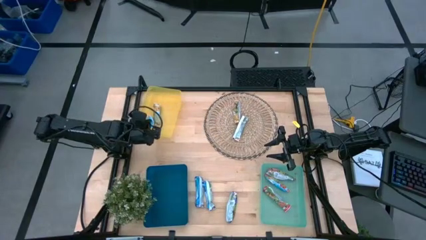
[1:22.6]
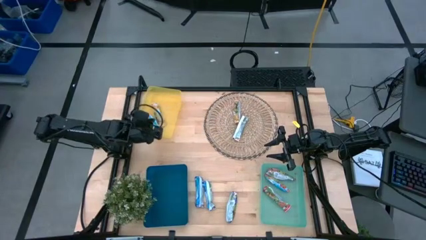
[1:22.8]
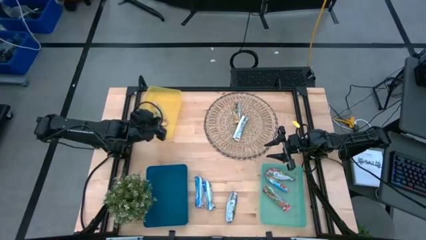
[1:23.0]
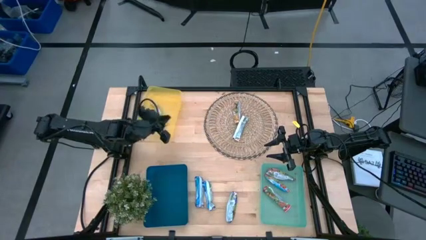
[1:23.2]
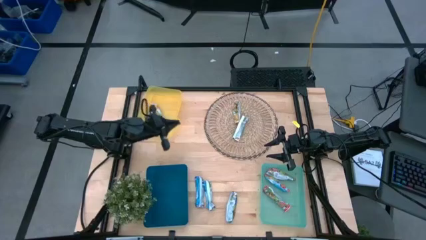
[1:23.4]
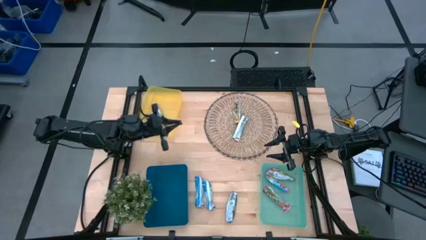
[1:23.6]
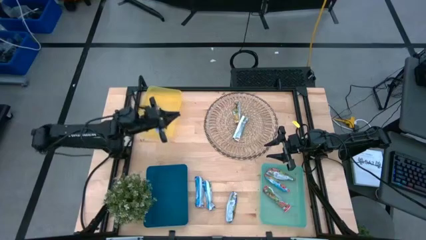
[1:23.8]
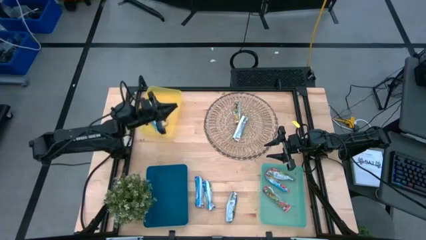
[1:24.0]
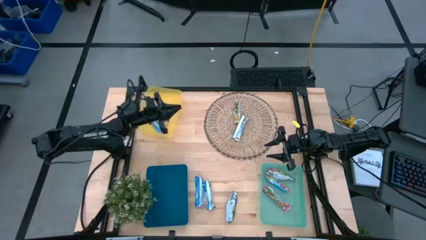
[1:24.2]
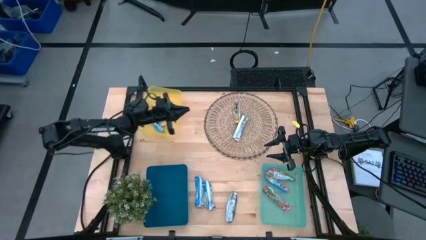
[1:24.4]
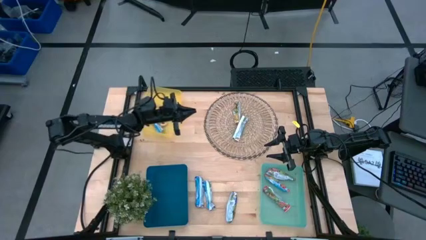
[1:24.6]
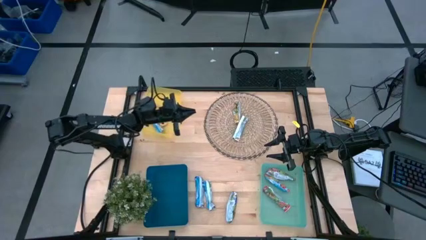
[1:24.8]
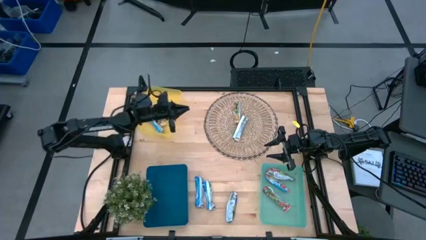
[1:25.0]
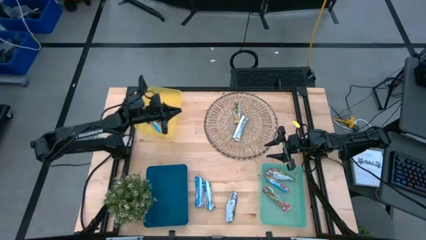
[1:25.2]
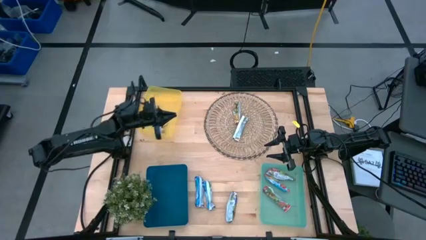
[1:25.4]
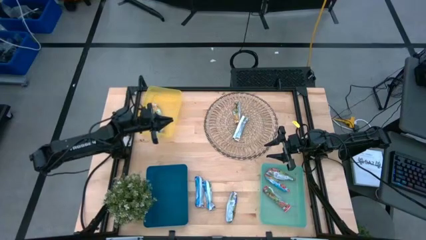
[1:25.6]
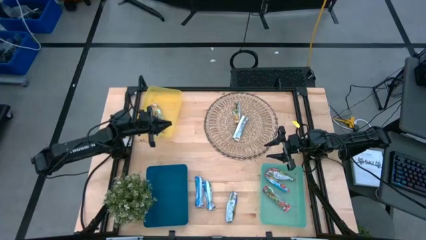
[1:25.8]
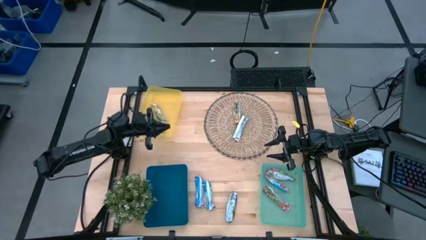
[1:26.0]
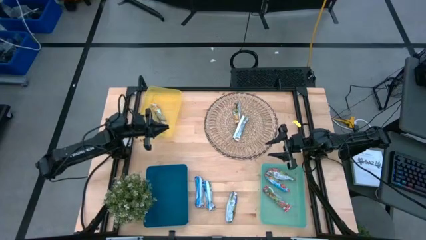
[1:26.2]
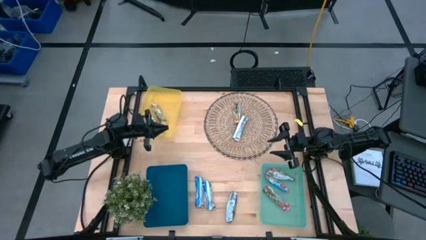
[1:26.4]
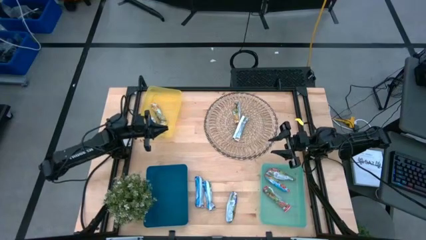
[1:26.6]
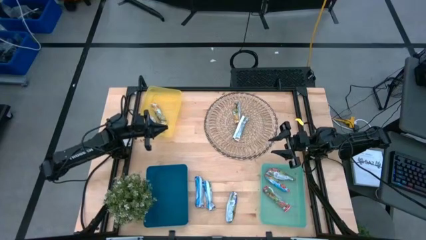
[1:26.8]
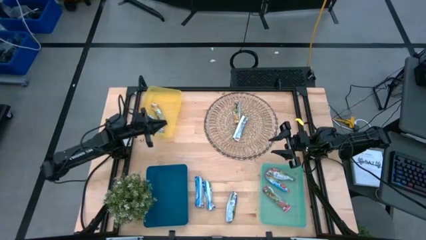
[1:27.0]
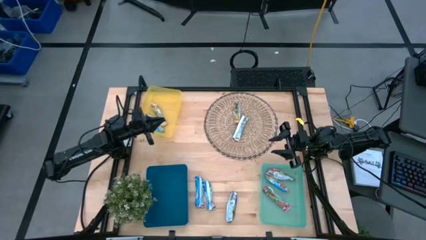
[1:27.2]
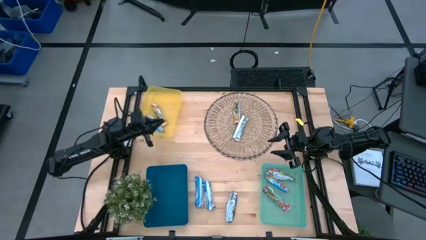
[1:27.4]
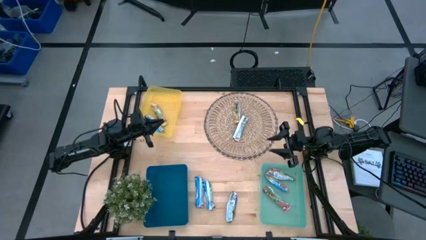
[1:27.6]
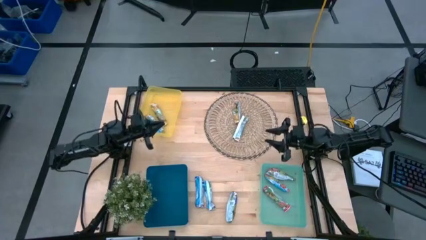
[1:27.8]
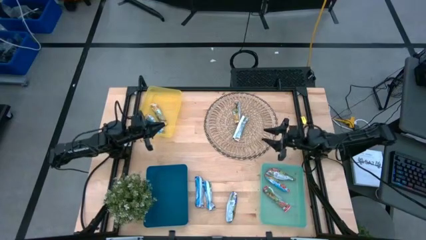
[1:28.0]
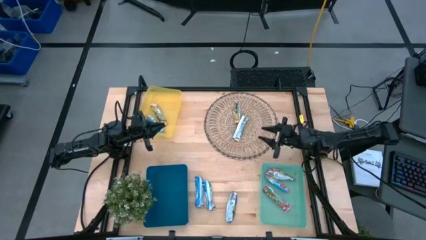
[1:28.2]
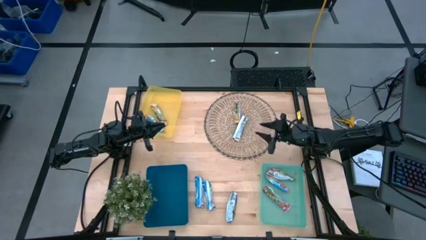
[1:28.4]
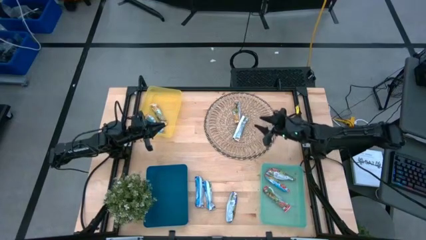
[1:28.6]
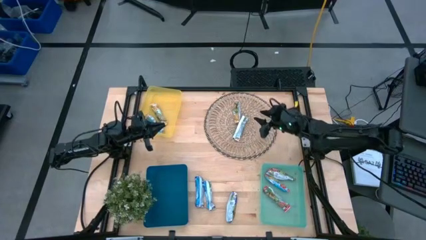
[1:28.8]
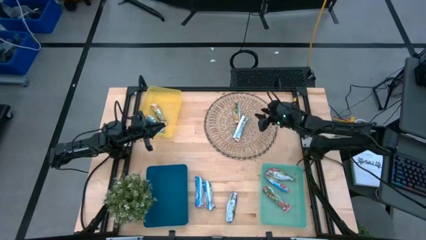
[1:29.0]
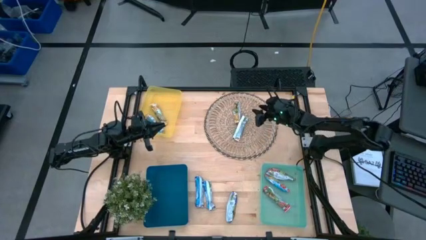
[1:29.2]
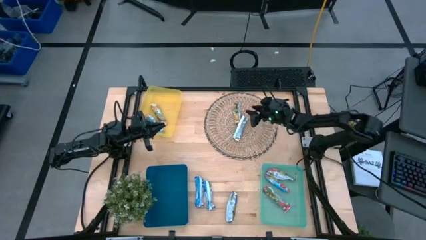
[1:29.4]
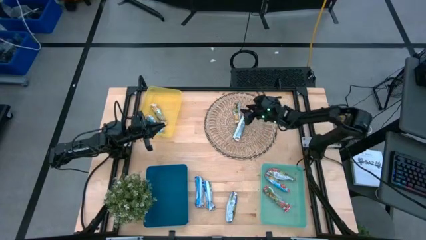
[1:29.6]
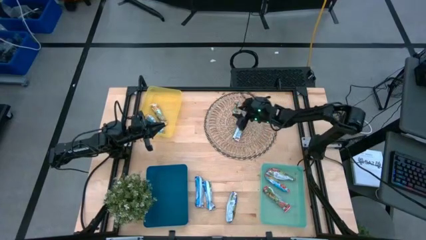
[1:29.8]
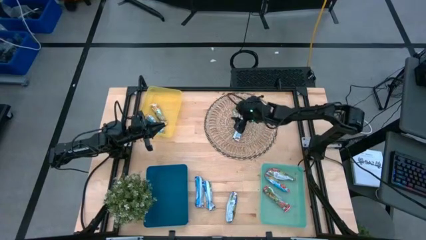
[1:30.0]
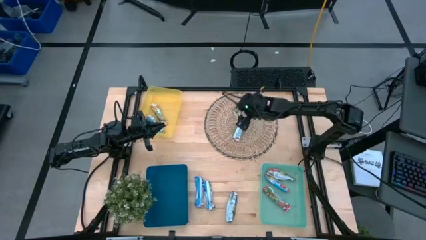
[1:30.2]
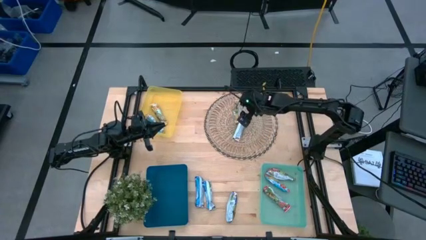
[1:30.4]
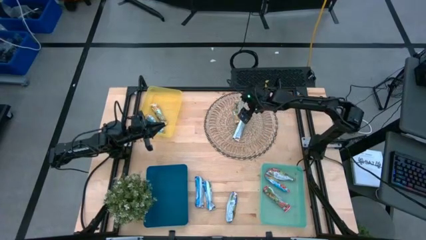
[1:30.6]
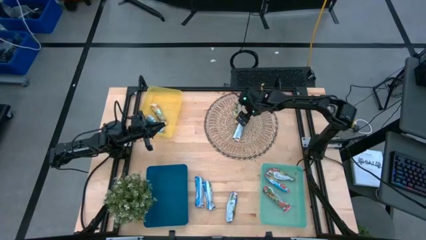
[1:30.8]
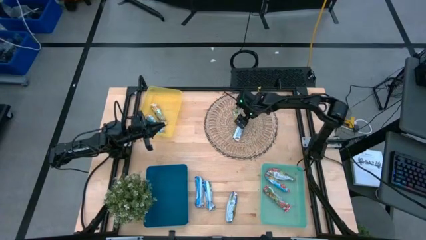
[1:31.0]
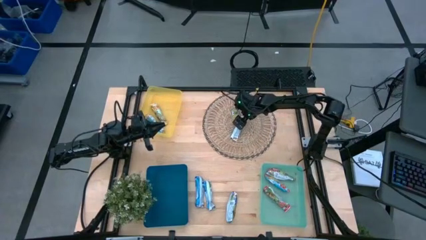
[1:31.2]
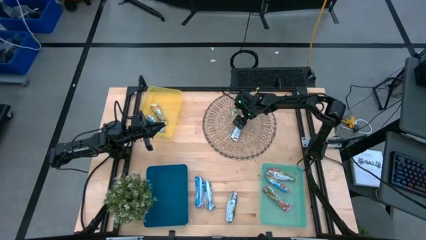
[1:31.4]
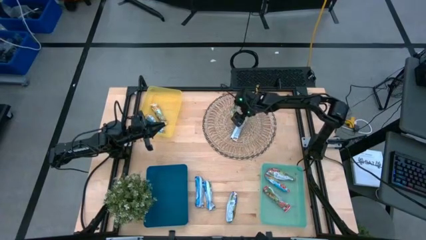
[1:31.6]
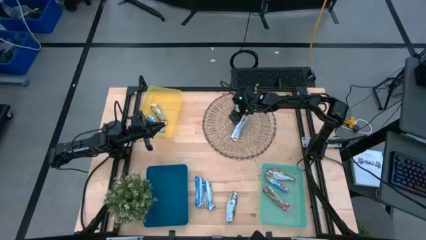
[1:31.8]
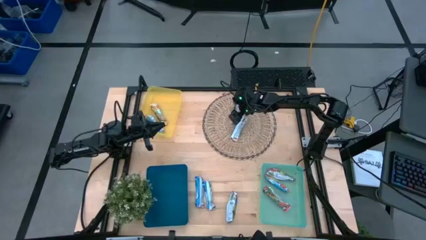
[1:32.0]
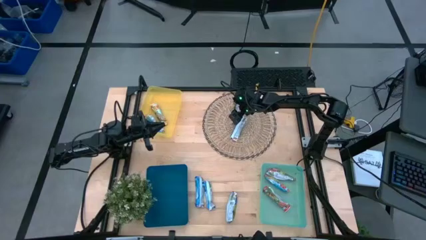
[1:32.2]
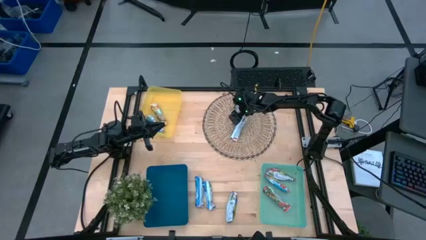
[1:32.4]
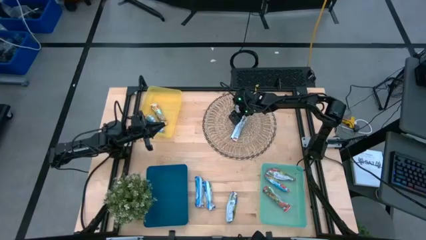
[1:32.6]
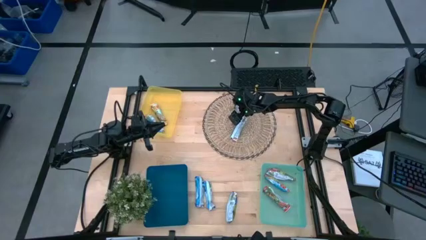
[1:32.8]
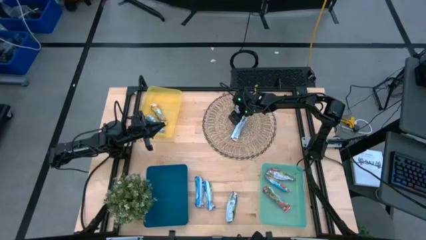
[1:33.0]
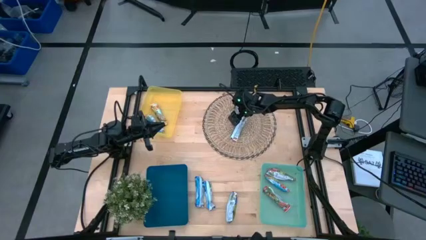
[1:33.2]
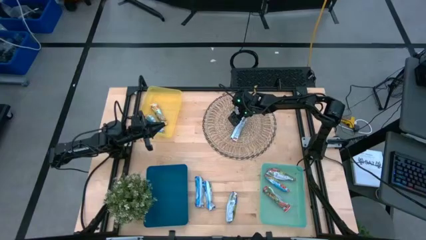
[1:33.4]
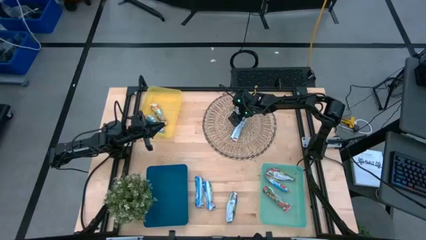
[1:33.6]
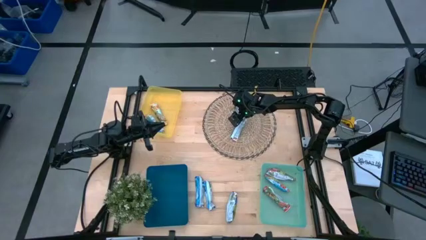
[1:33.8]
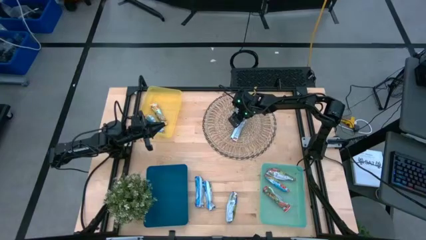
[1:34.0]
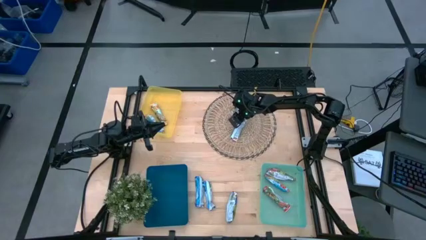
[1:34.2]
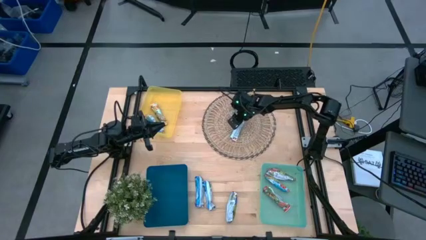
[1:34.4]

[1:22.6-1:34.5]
Task: Pick and place Granola Bars by type
Put the yellow granola bar into the yellow bin

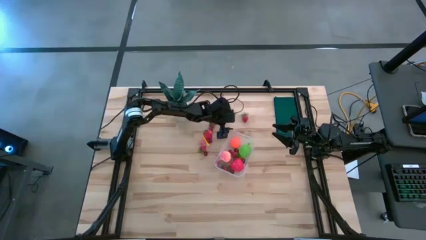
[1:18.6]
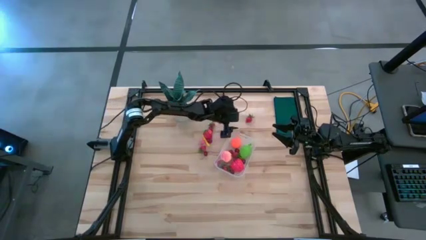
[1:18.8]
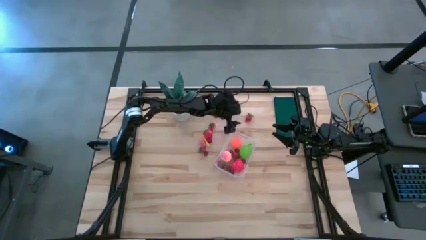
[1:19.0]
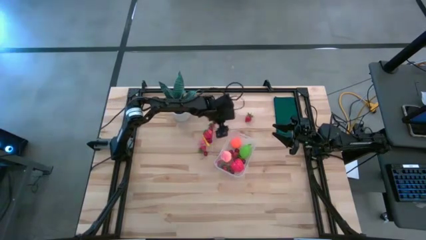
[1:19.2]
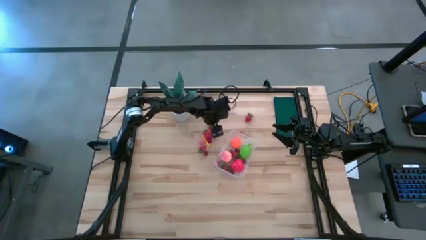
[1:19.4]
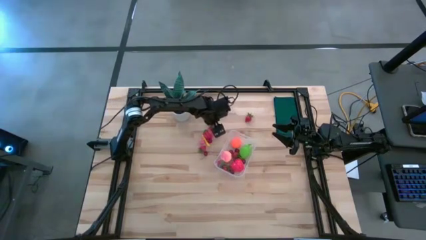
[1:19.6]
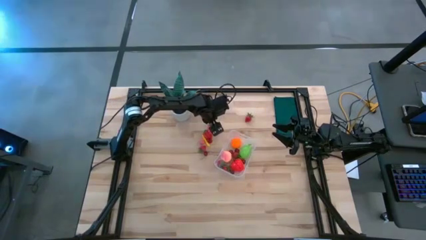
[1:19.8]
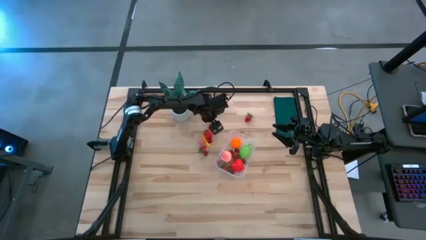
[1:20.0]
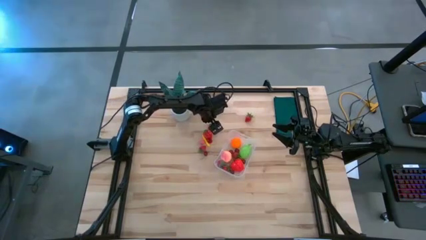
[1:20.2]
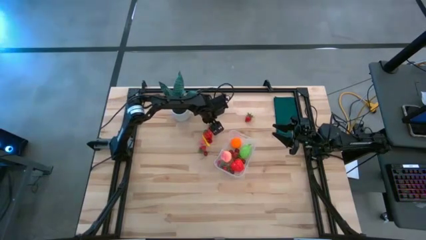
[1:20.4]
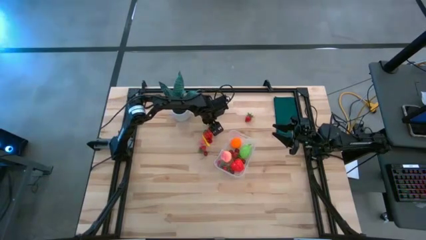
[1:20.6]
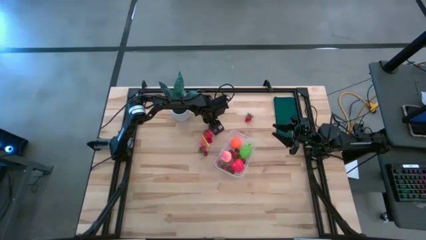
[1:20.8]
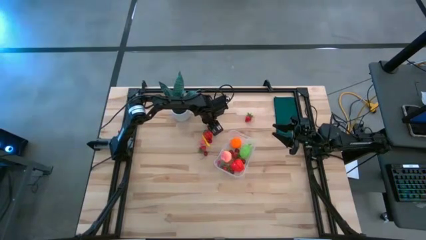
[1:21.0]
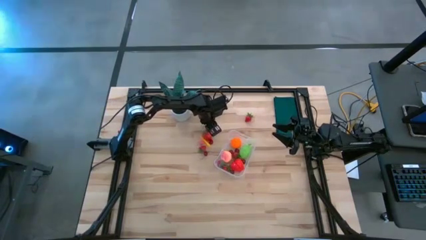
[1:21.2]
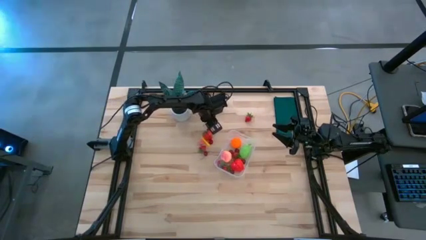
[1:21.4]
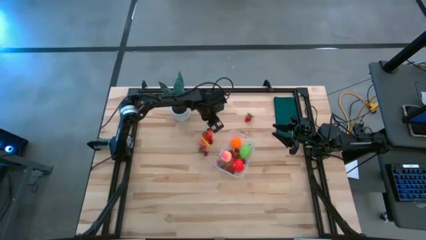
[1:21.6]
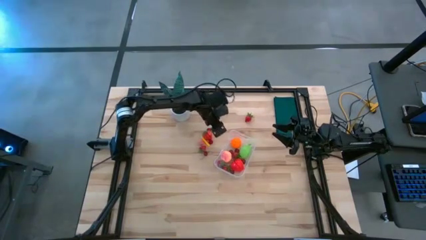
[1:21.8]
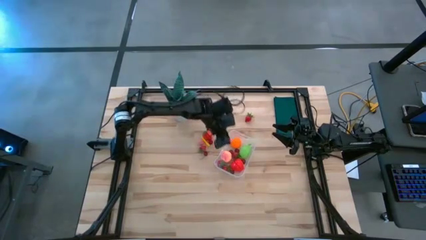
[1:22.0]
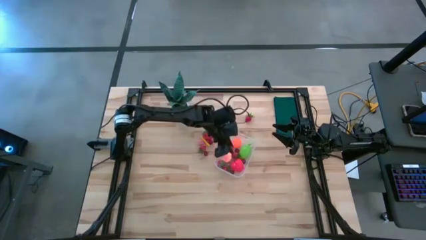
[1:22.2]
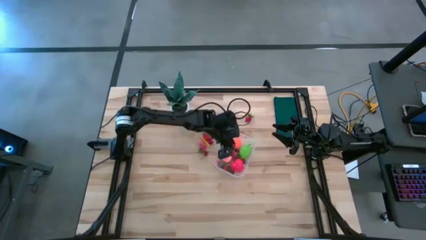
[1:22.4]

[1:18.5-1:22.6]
Task: Pick and placing Produce into tupperware
Put the red strawberry into the container
